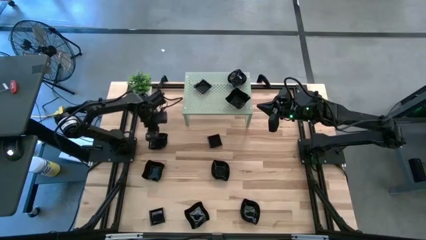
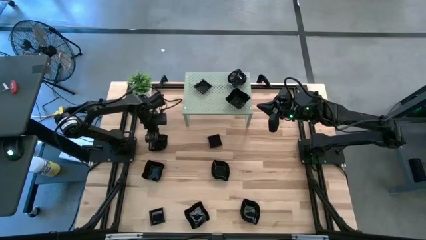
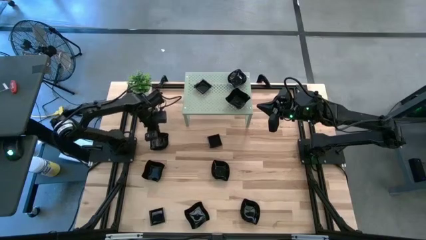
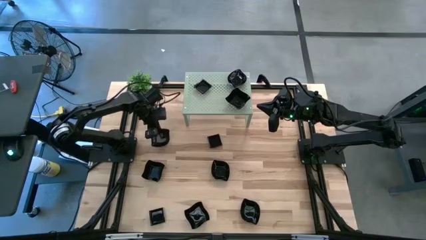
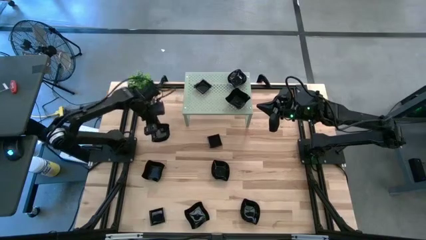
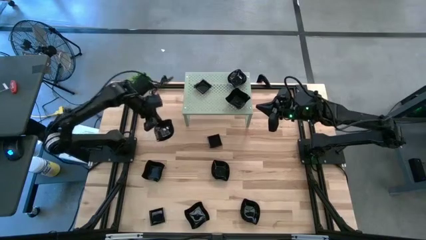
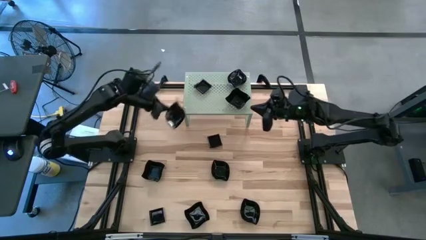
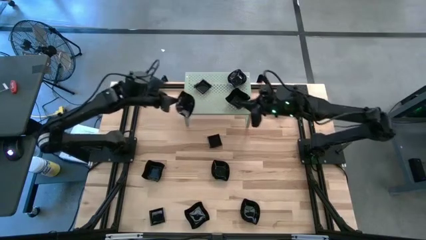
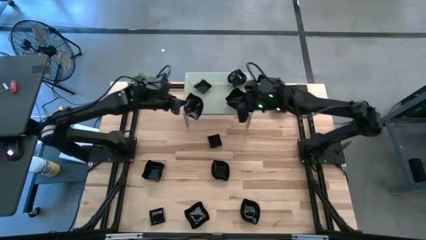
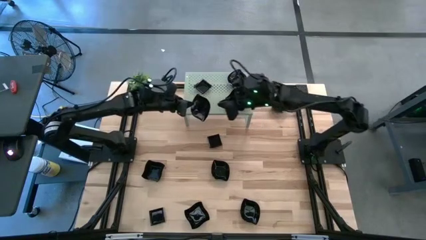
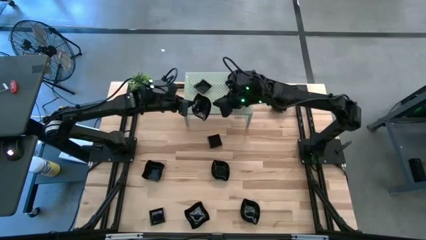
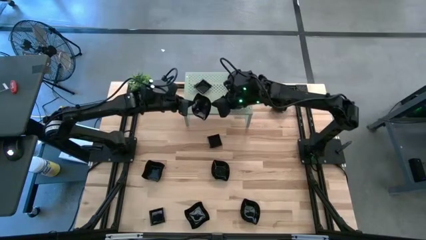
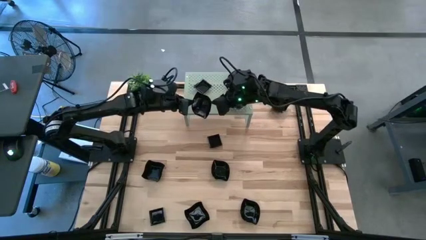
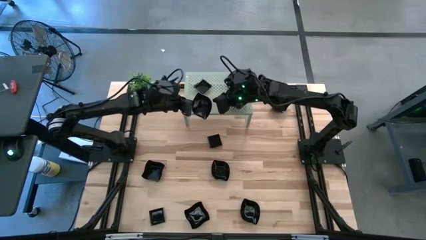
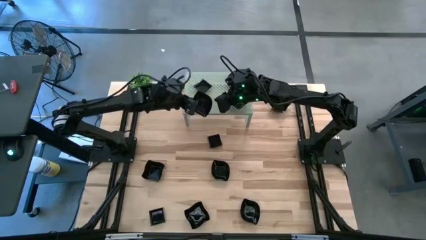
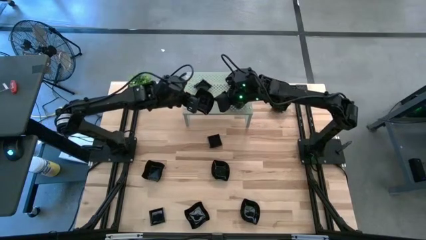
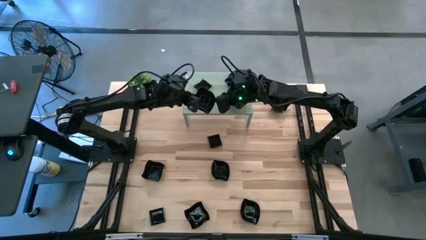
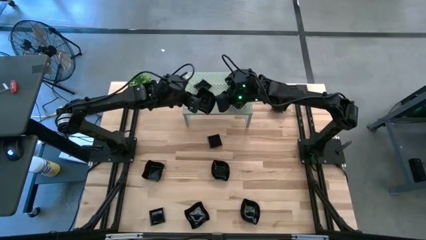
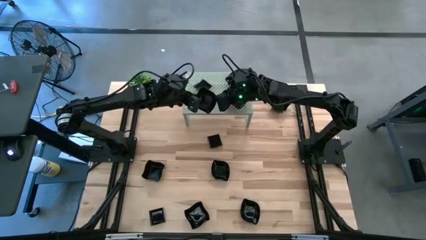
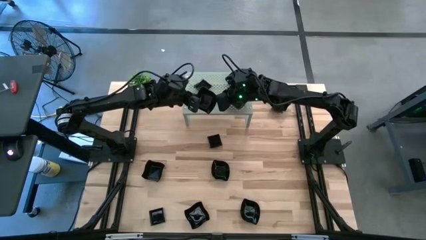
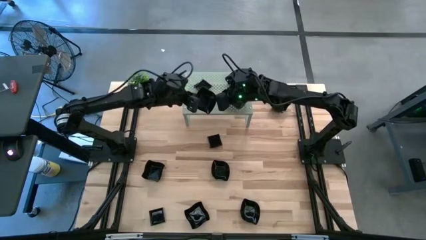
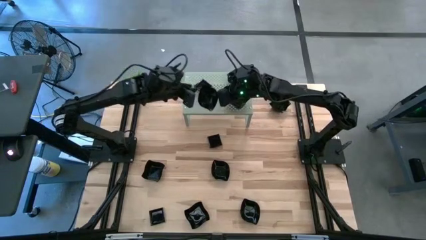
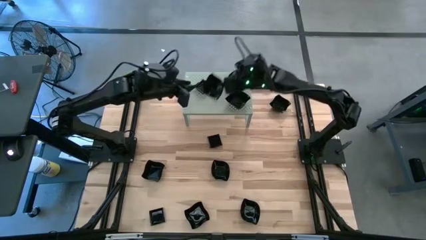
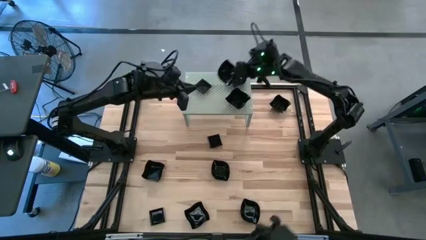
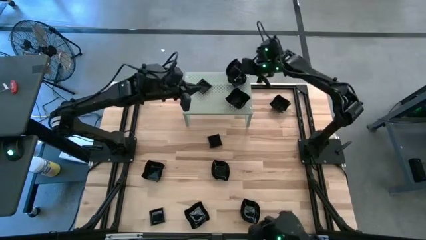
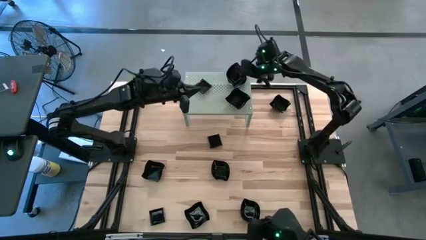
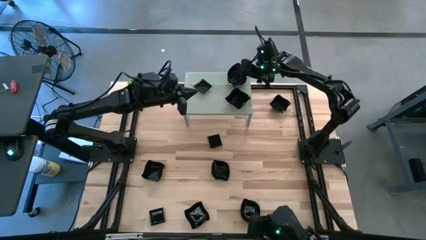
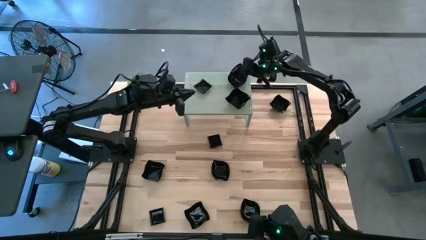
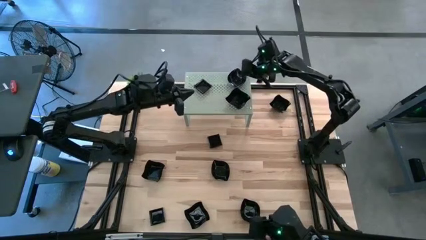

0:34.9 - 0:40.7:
Task: Pick & Place Mini shaped plates
Stack the black leaf-shaped plate on top of the black leaf-shaped plate on the shelf

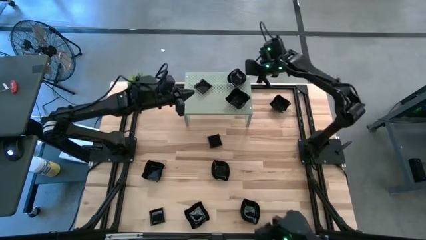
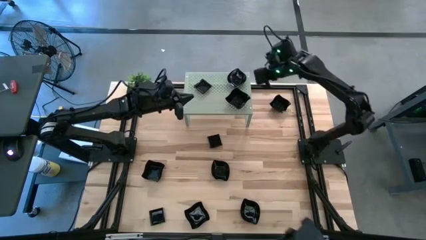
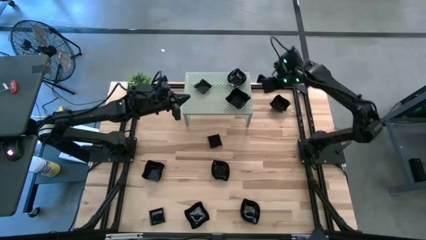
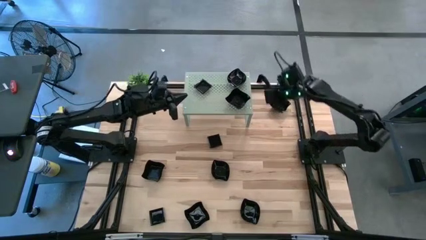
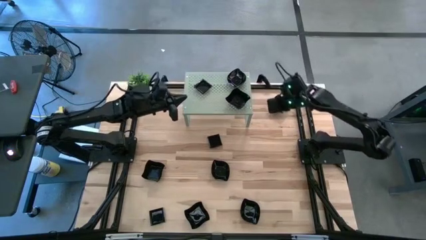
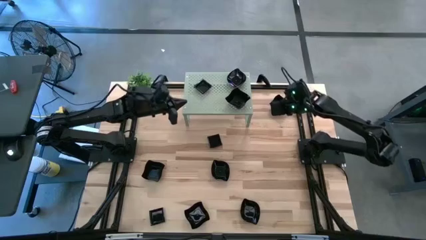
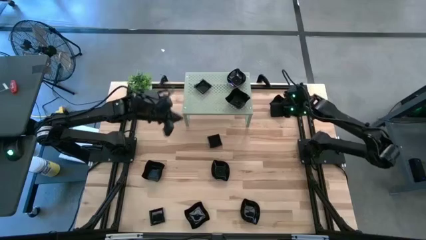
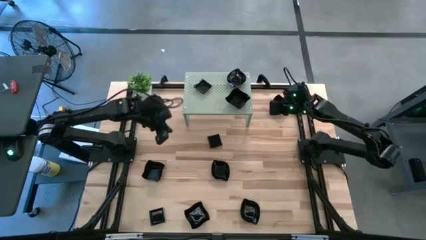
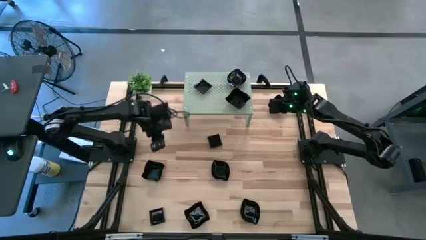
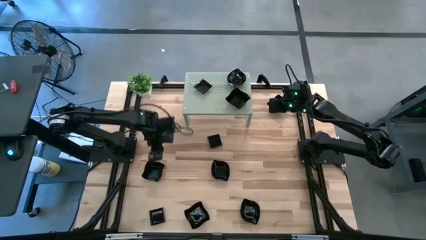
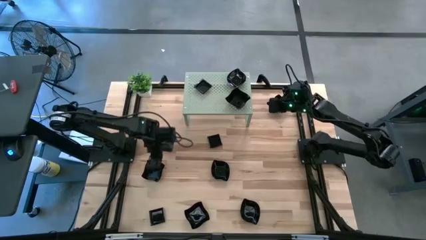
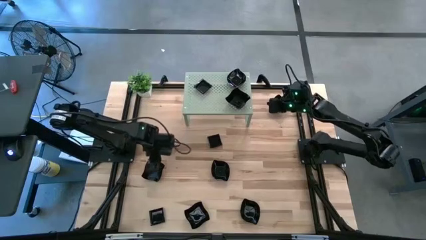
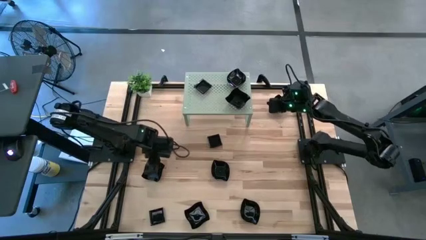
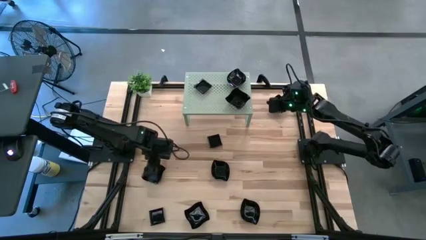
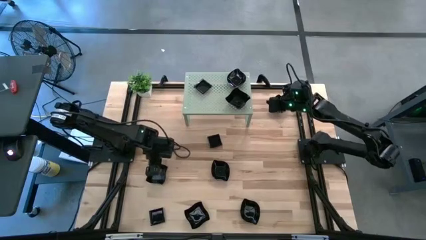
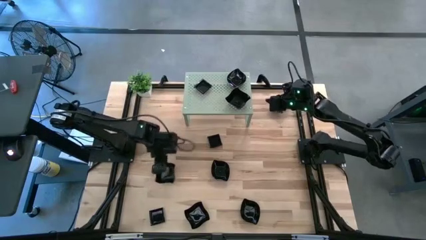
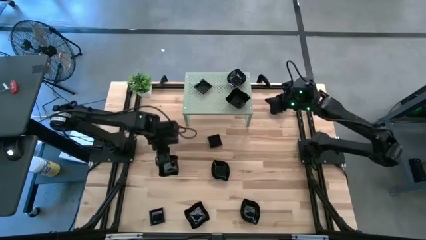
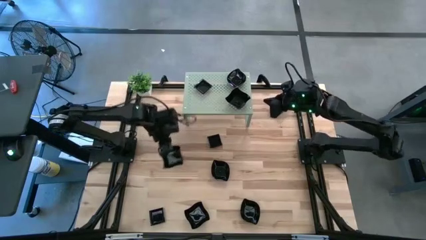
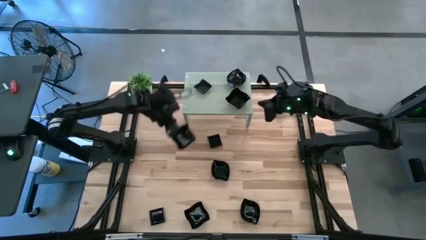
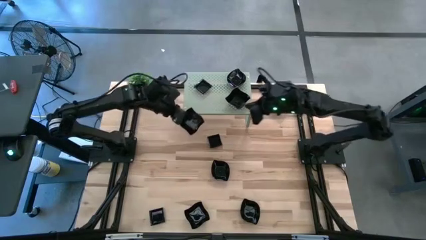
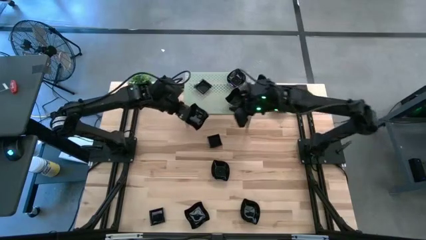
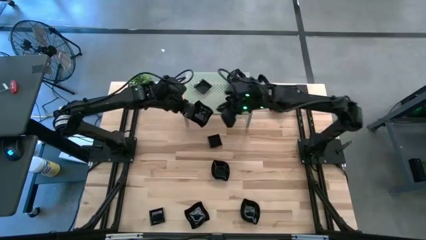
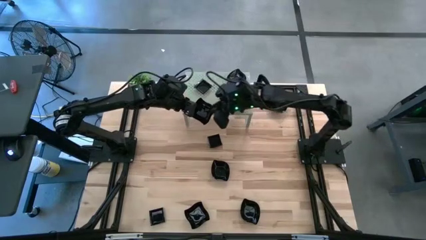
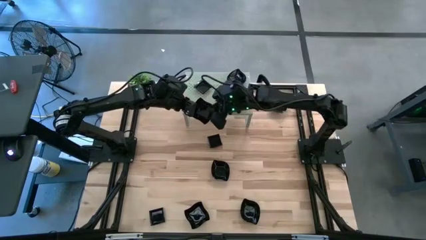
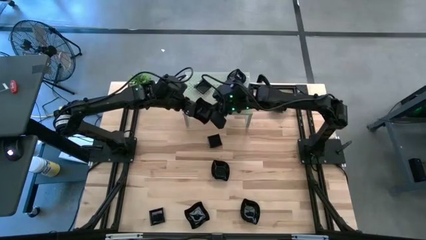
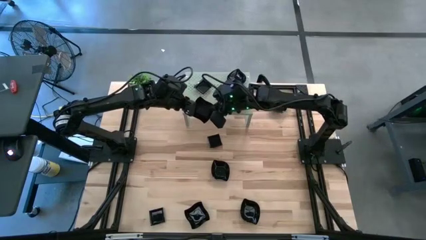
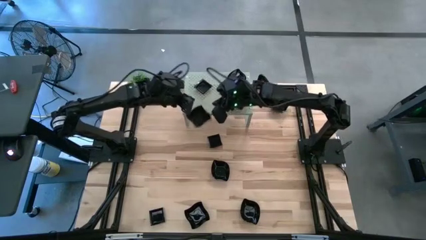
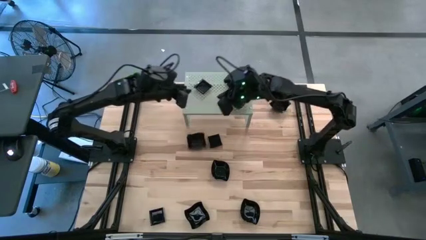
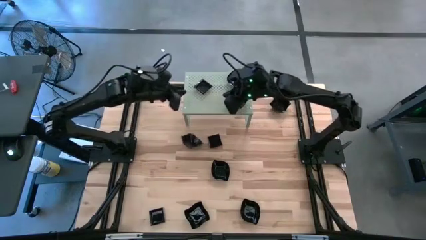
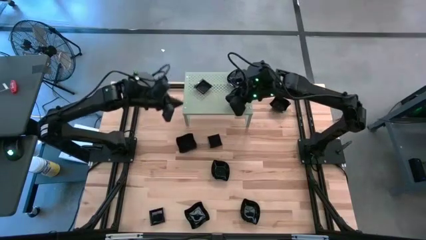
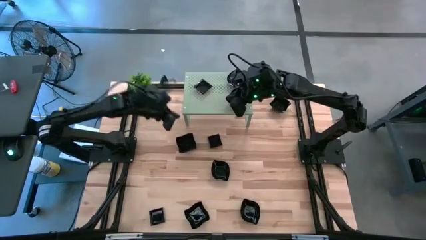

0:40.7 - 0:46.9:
Stack the black distorted square plate on top of the black distorted square plate on the shelf

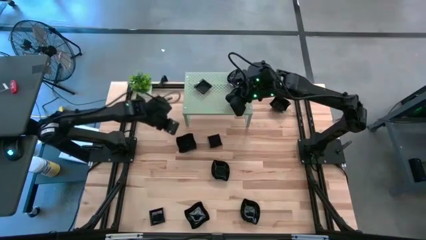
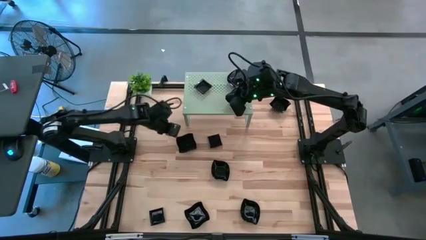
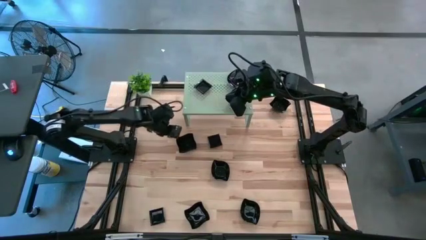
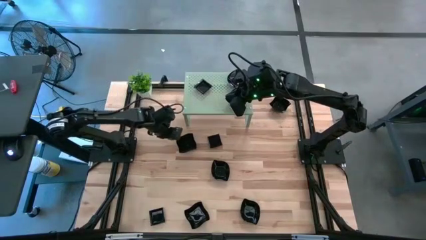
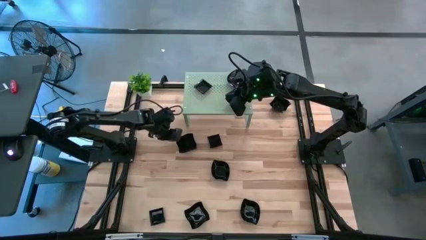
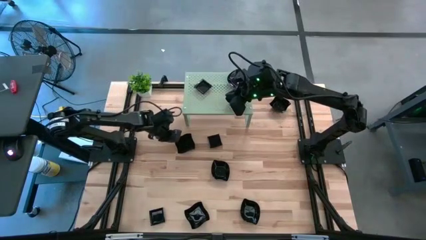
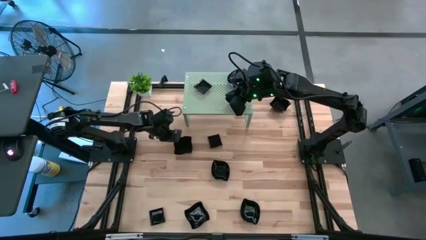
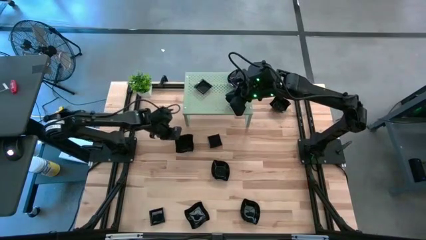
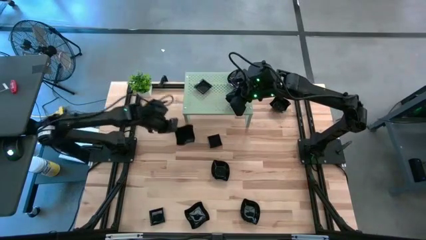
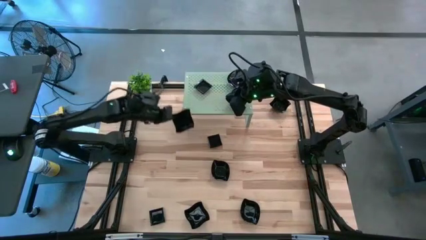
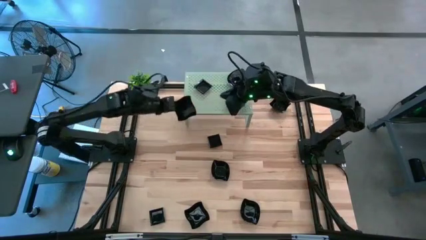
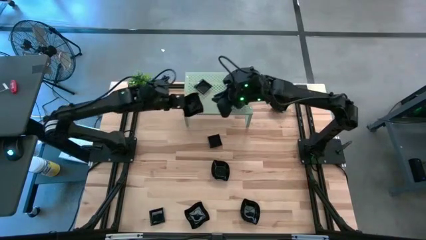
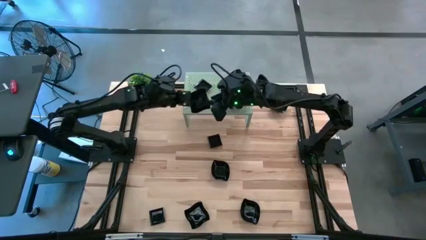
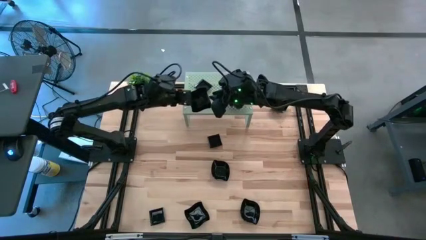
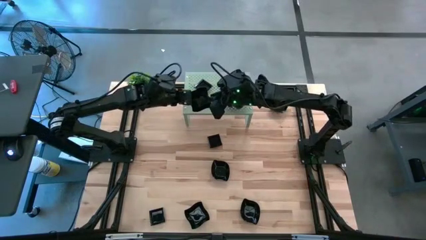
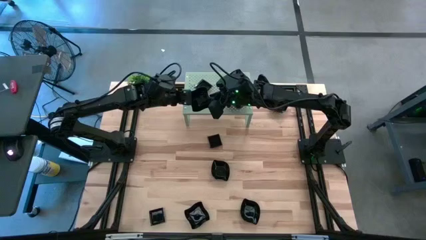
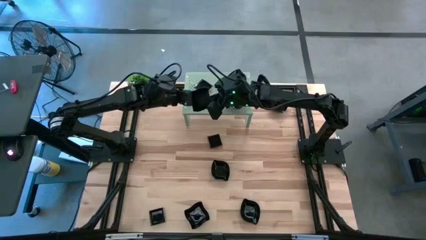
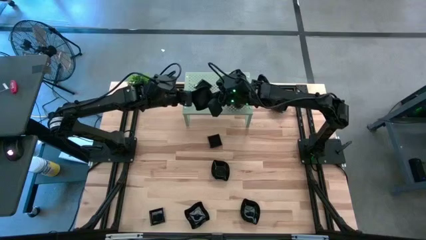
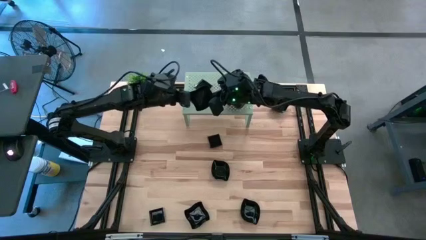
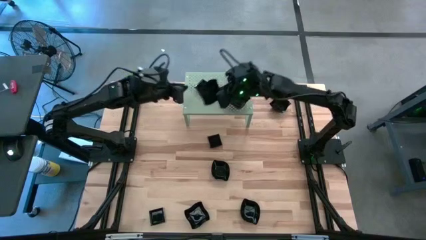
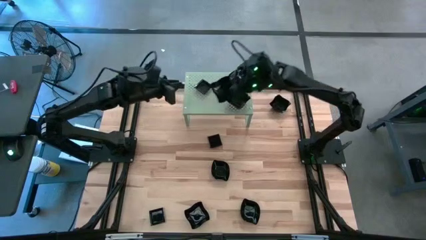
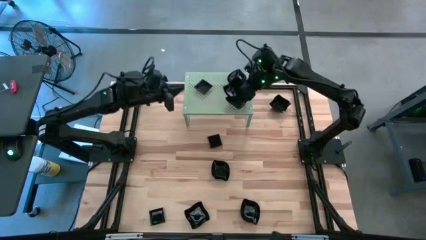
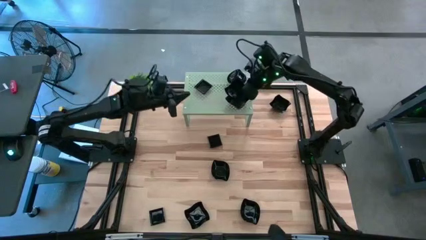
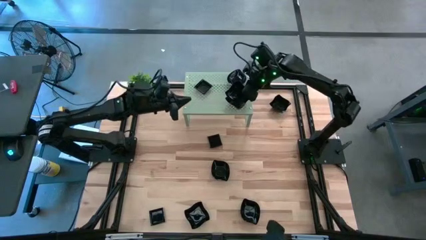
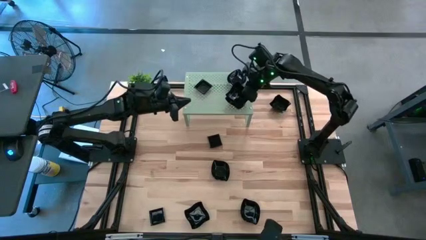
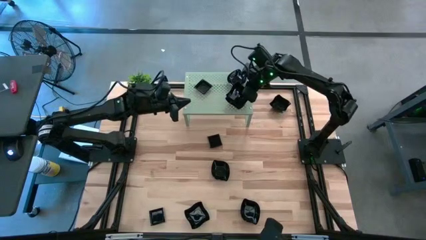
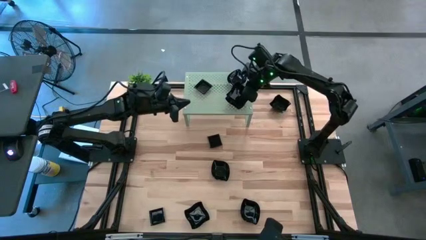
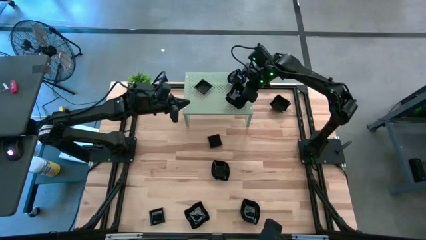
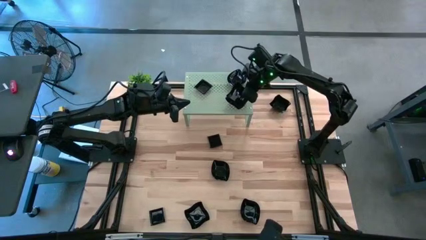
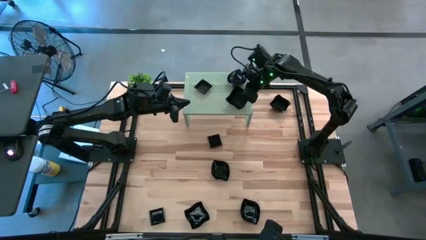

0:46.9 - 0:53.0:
Stack the black distorted square plate on top of the black distorted square plate on the shelf
